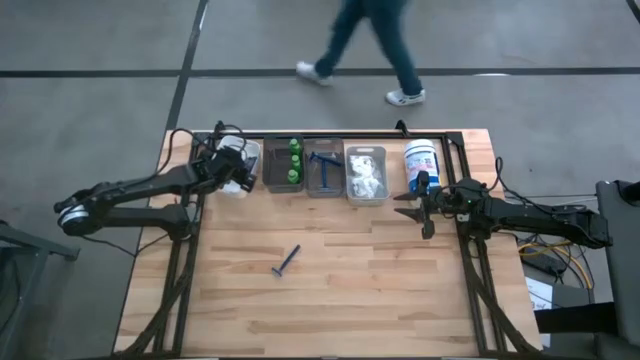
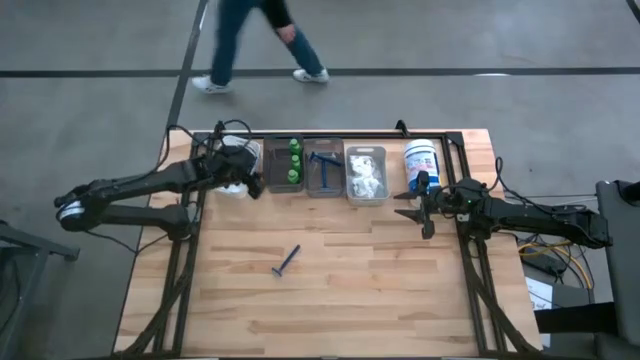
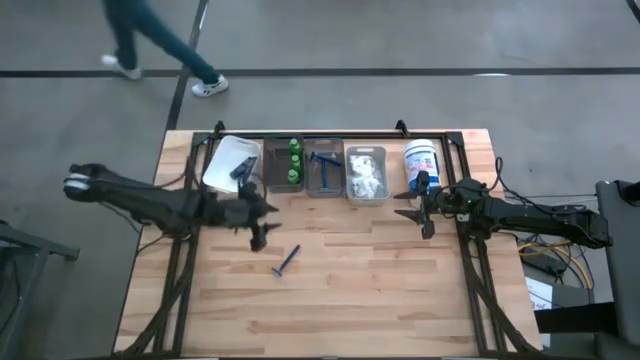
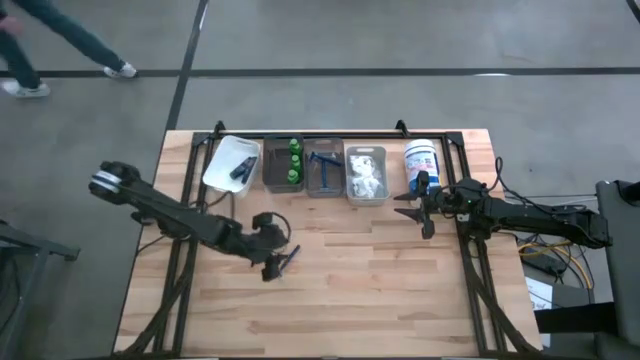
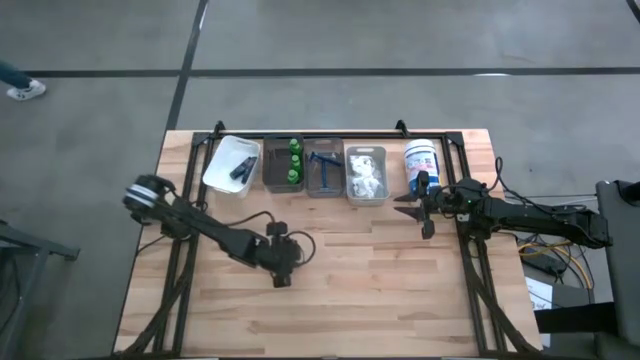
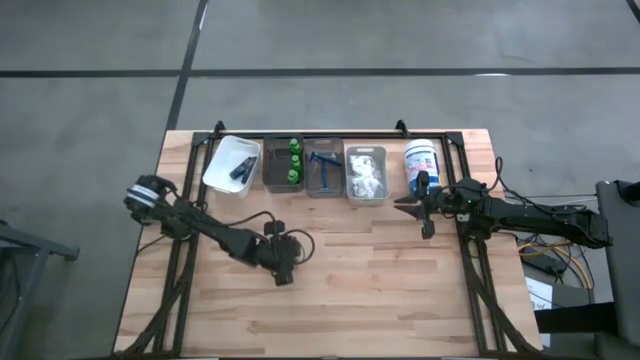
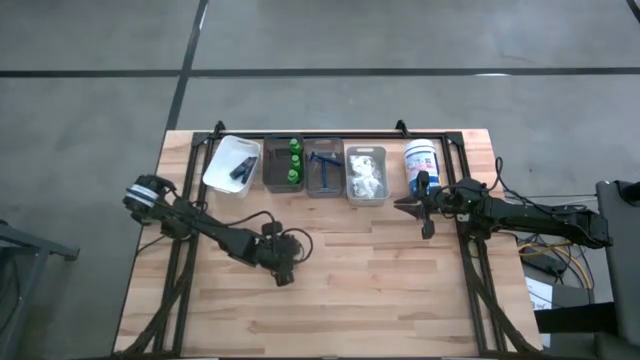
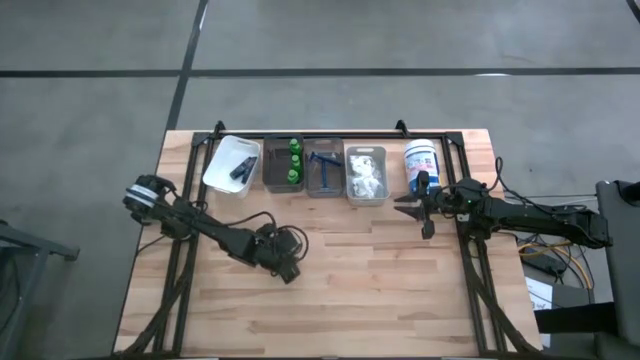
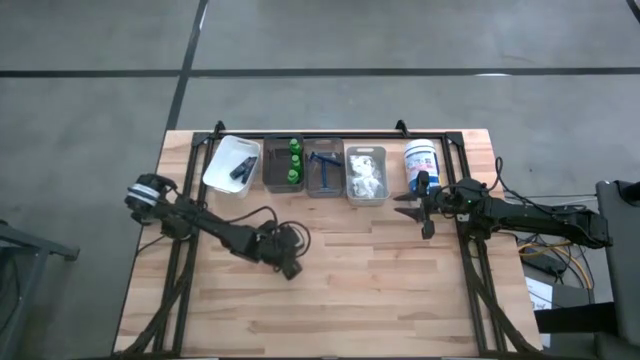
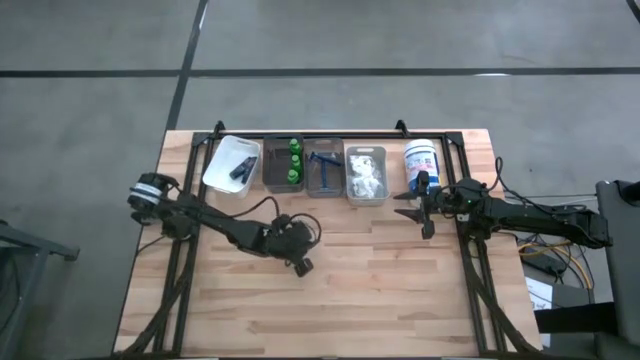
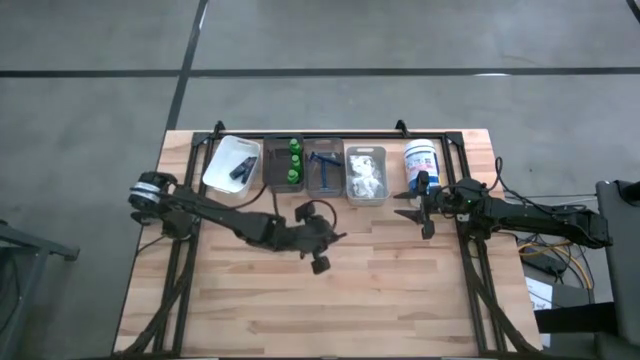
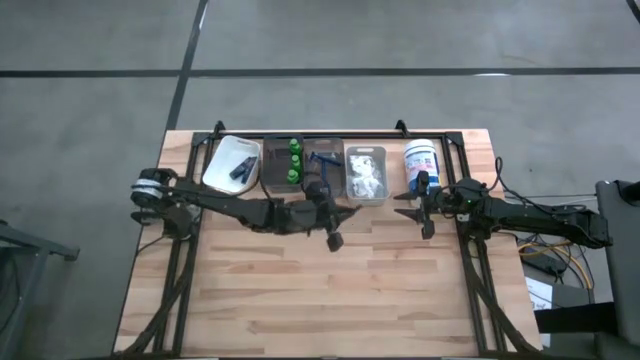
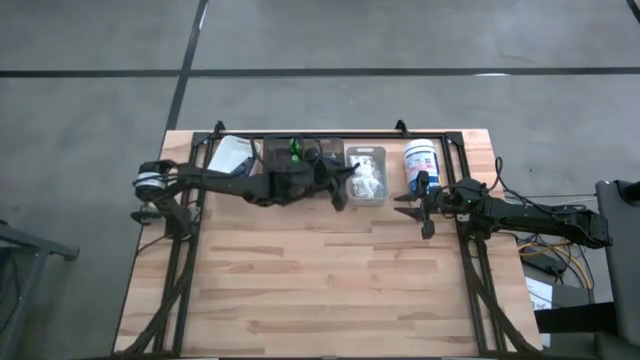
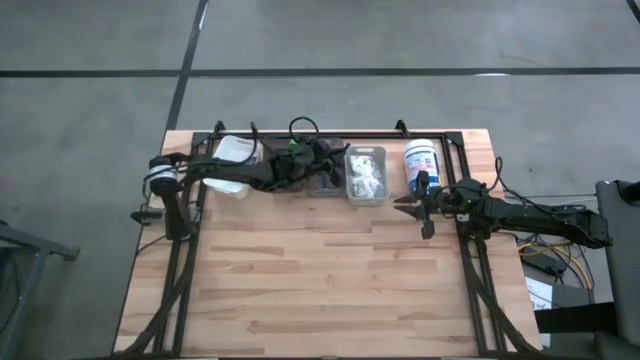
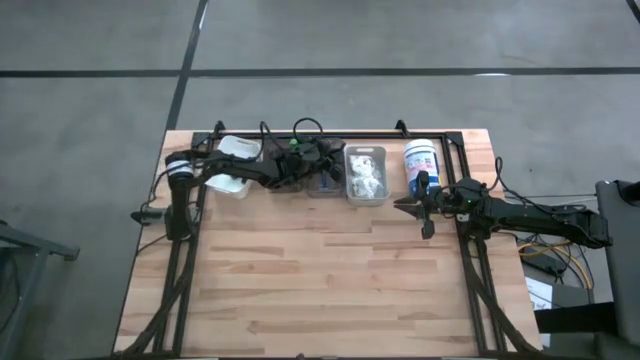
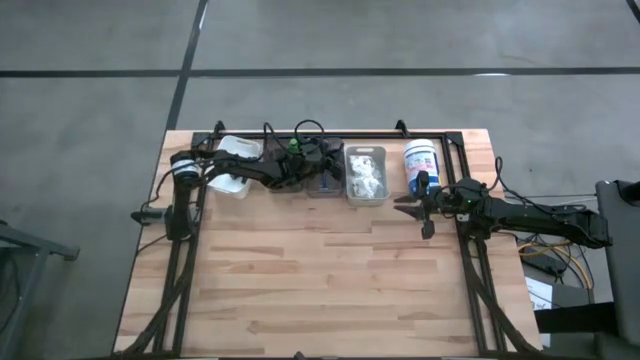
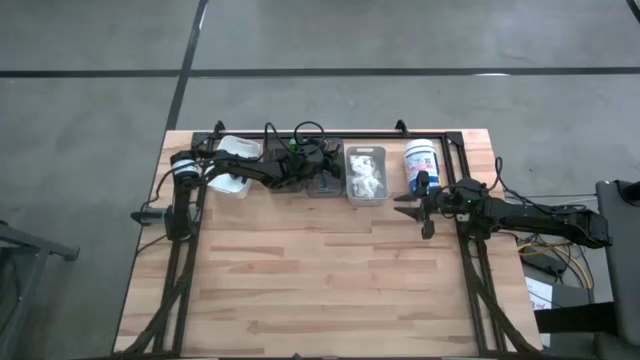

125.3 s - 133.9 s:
Task: Pick & Place Travel size toiletries
Put the razor into the right black bin

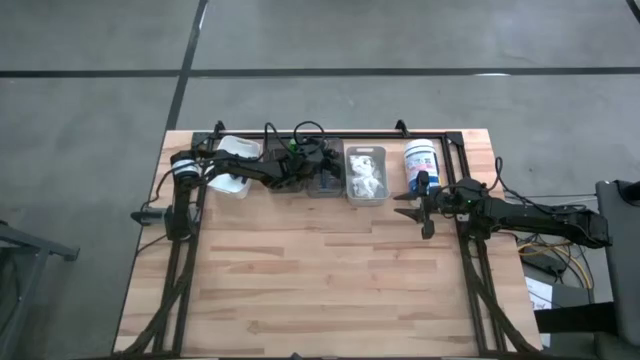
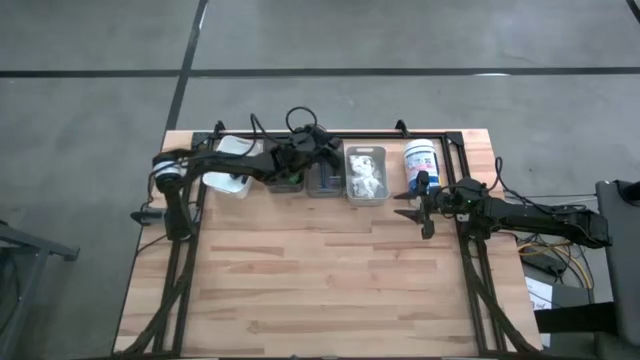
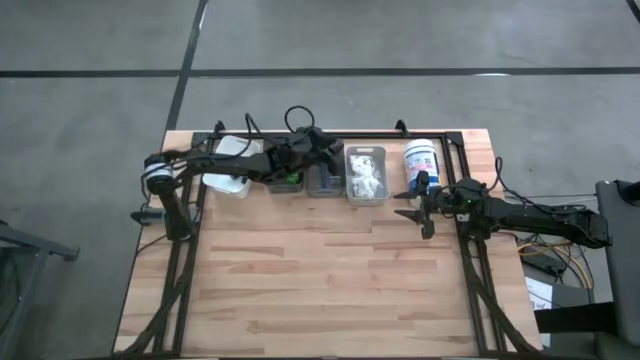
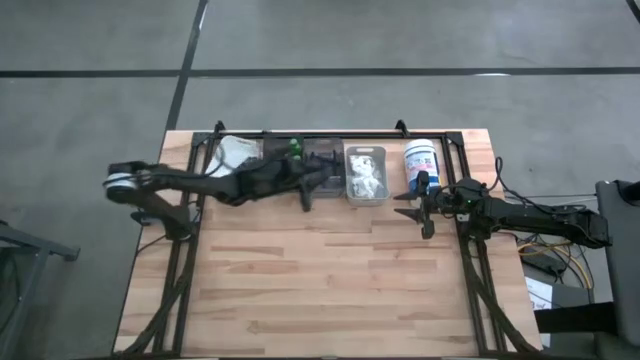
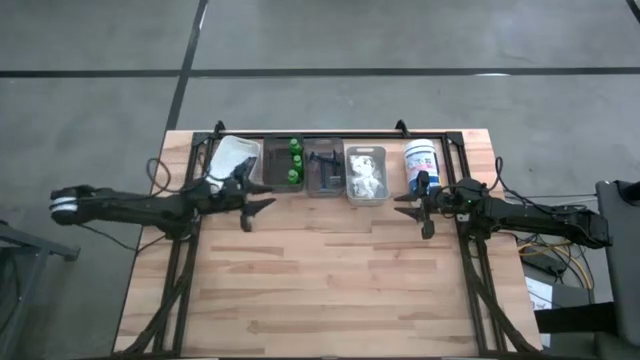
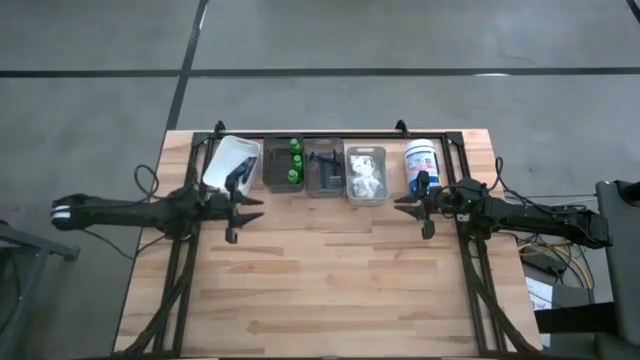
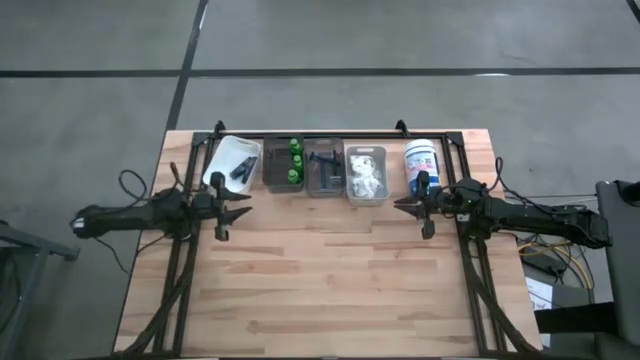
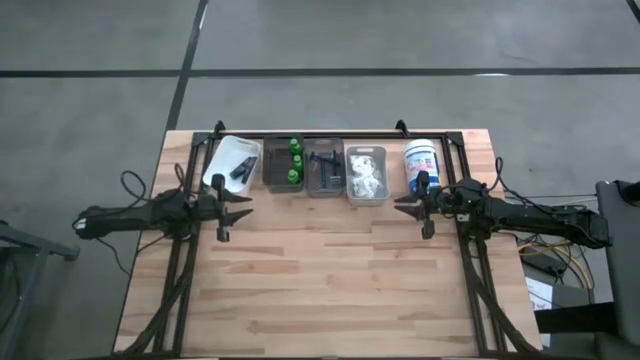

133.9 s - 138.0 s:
Return to Home Position
